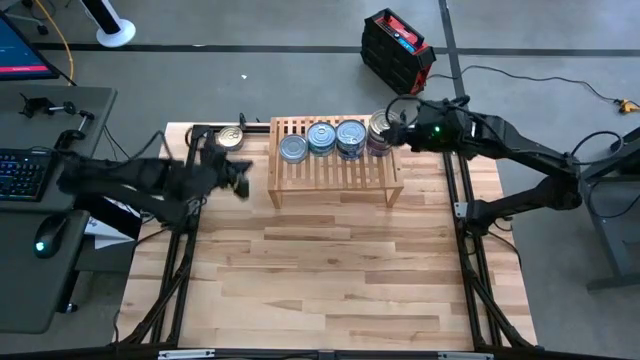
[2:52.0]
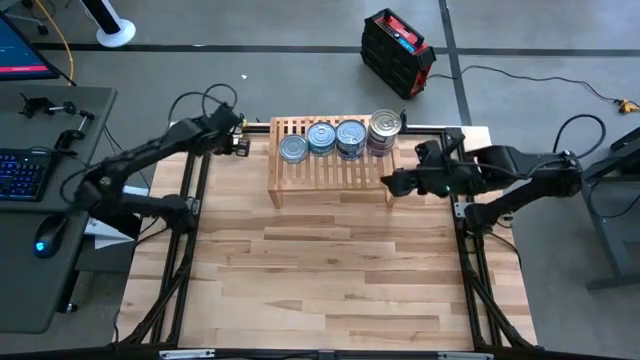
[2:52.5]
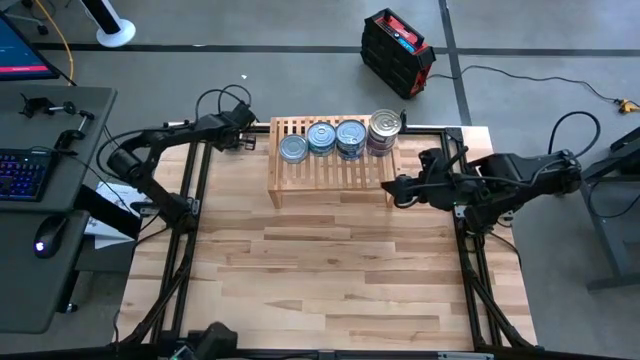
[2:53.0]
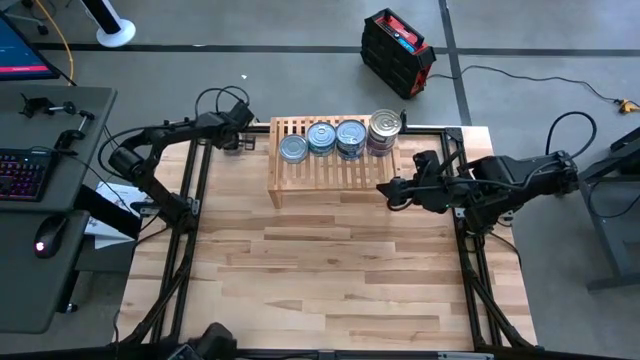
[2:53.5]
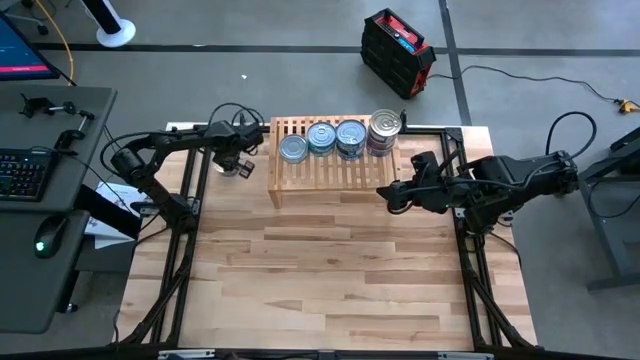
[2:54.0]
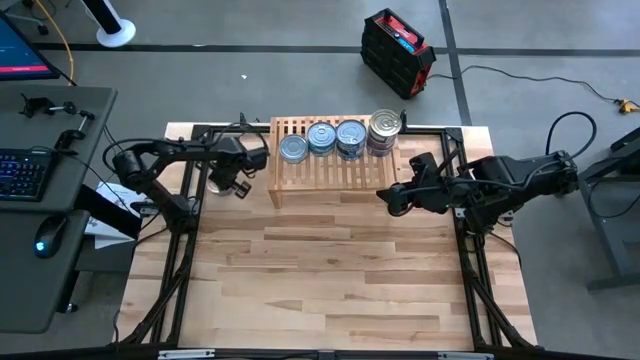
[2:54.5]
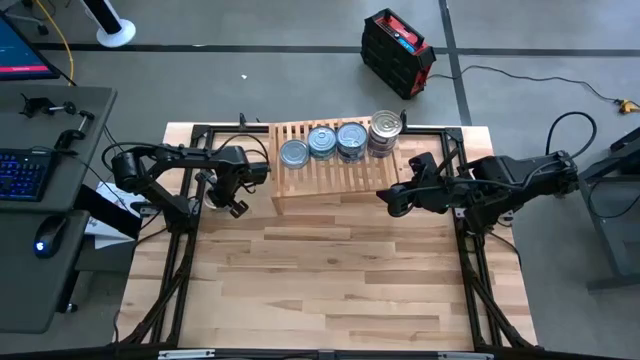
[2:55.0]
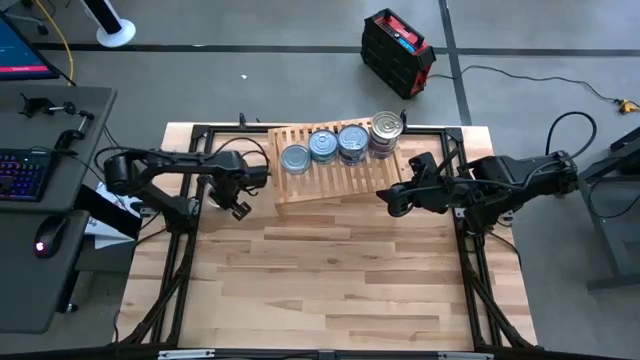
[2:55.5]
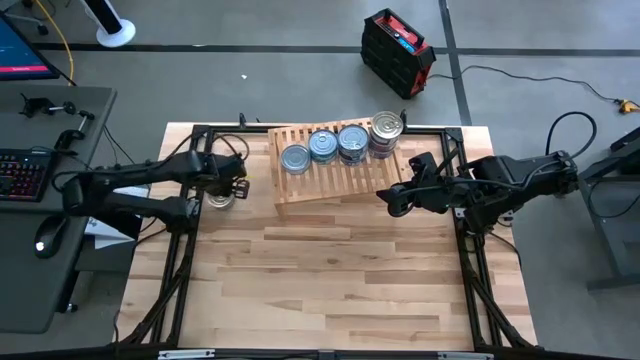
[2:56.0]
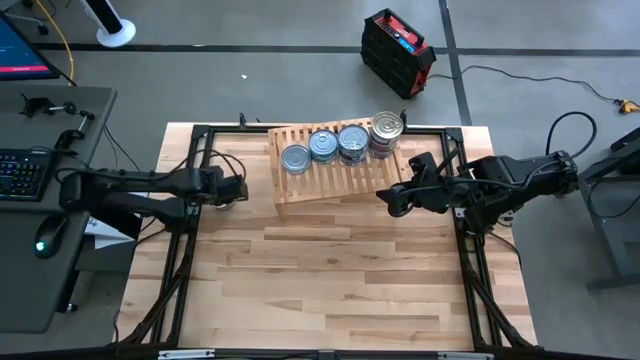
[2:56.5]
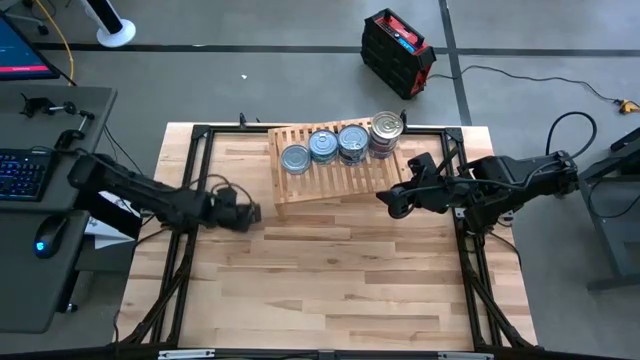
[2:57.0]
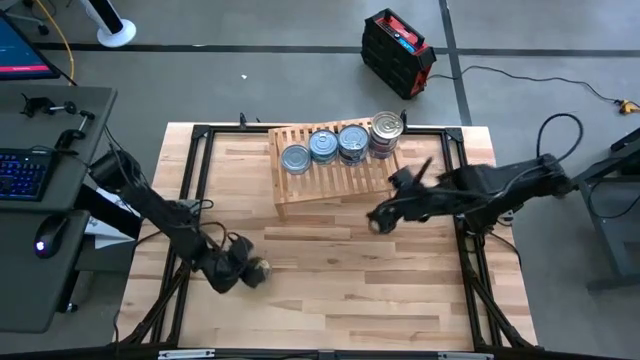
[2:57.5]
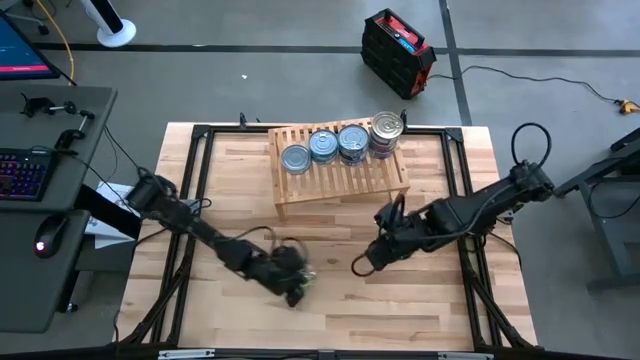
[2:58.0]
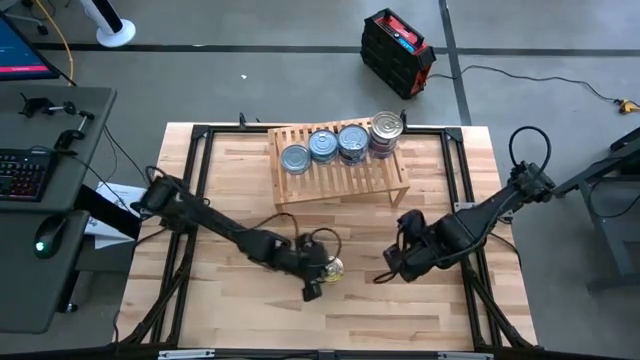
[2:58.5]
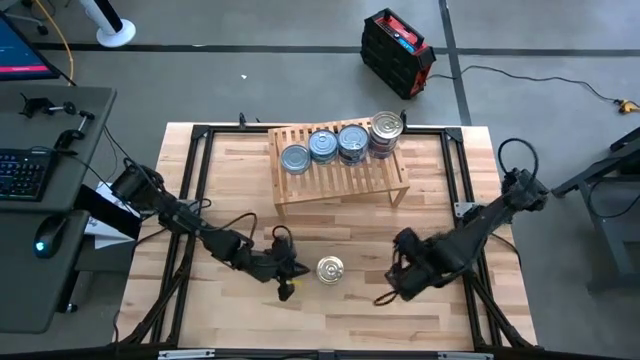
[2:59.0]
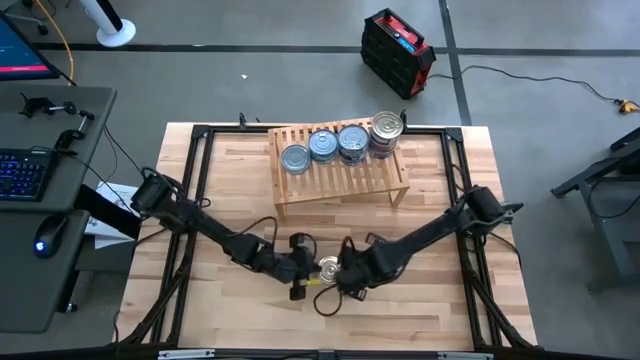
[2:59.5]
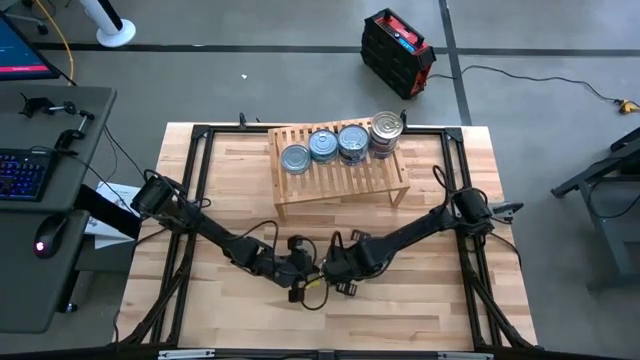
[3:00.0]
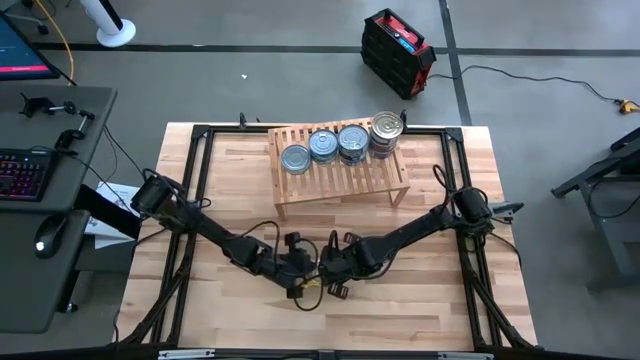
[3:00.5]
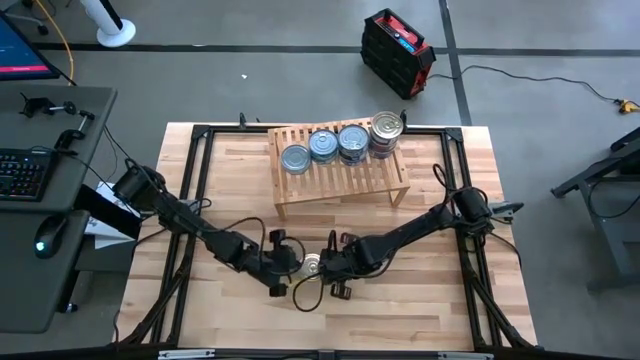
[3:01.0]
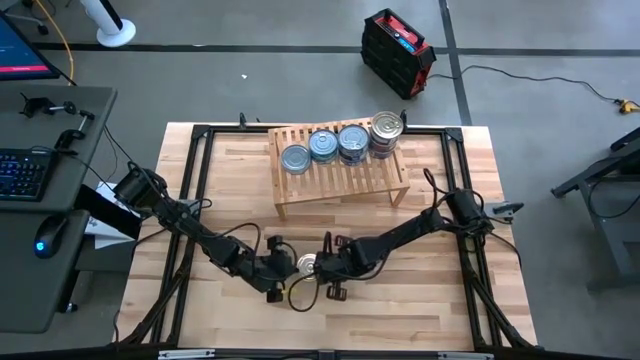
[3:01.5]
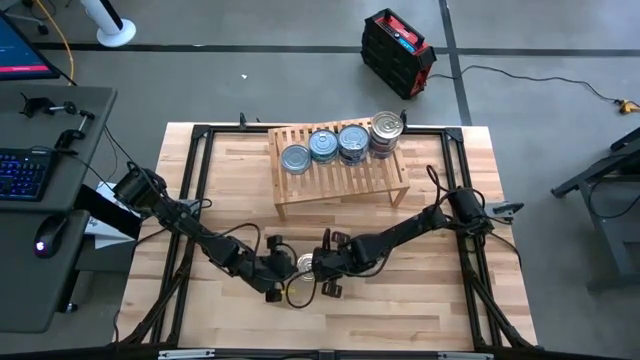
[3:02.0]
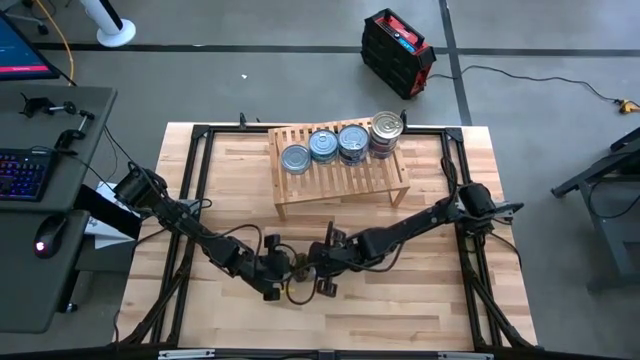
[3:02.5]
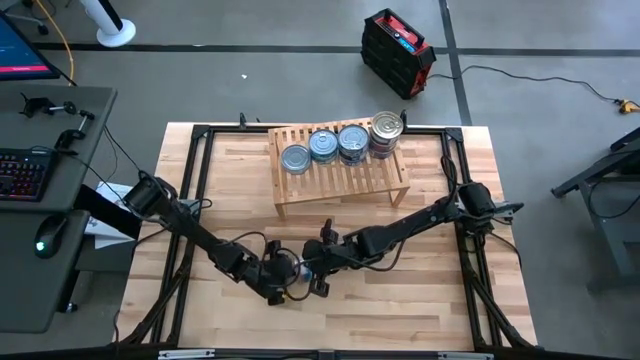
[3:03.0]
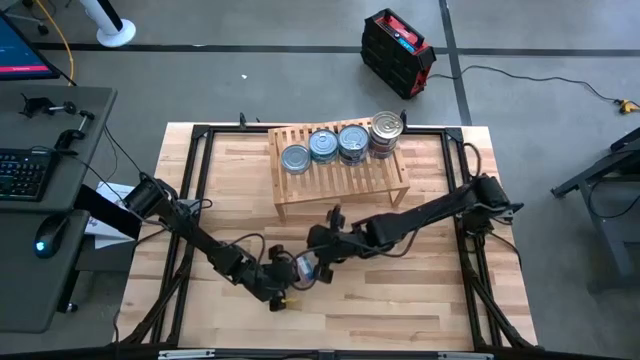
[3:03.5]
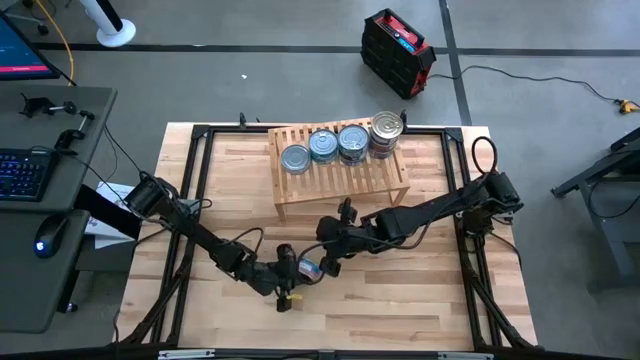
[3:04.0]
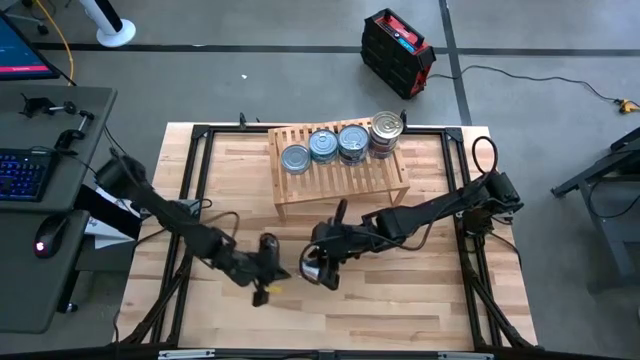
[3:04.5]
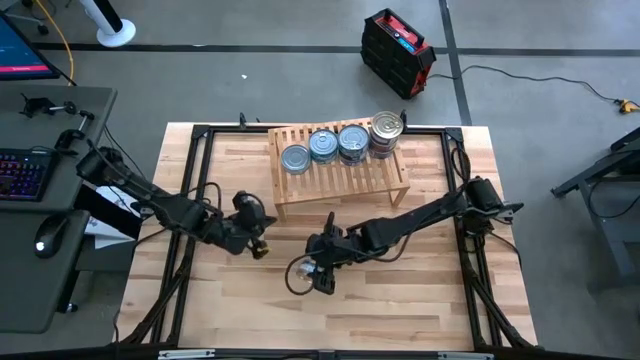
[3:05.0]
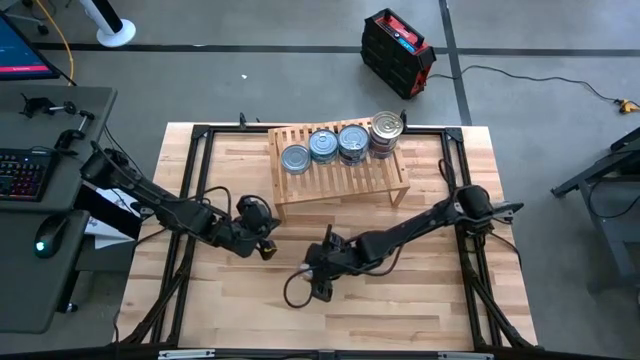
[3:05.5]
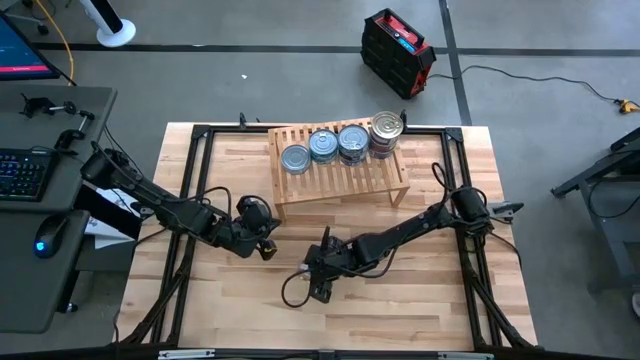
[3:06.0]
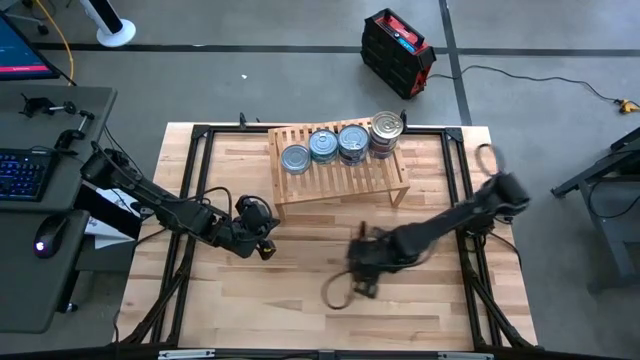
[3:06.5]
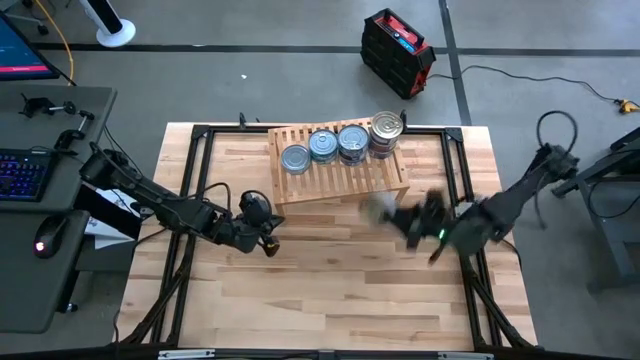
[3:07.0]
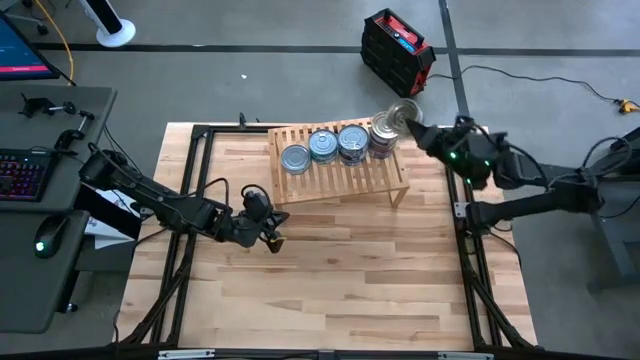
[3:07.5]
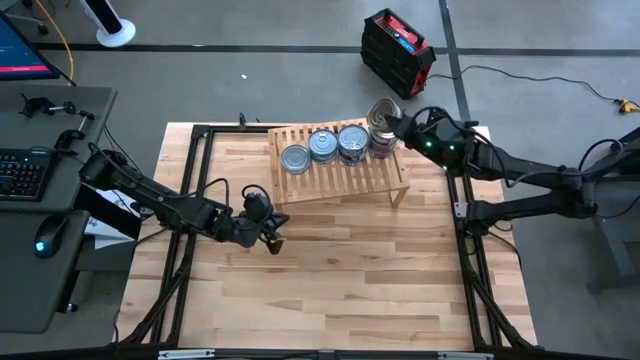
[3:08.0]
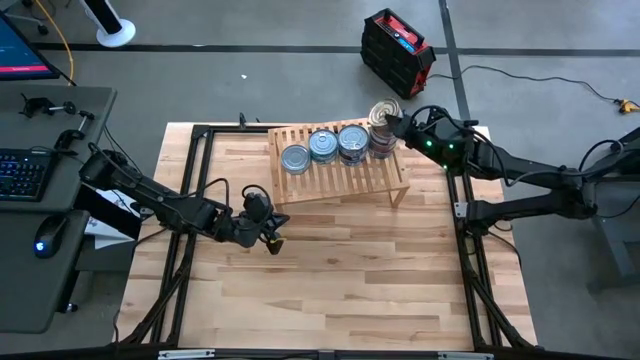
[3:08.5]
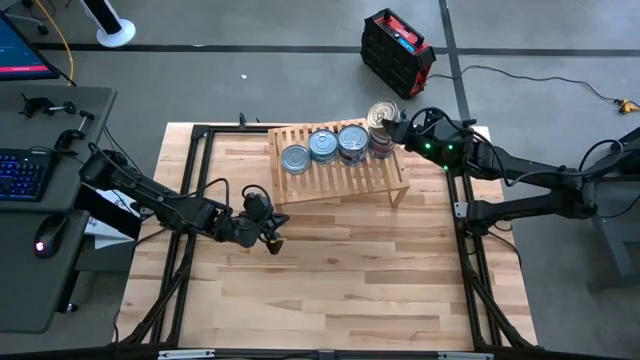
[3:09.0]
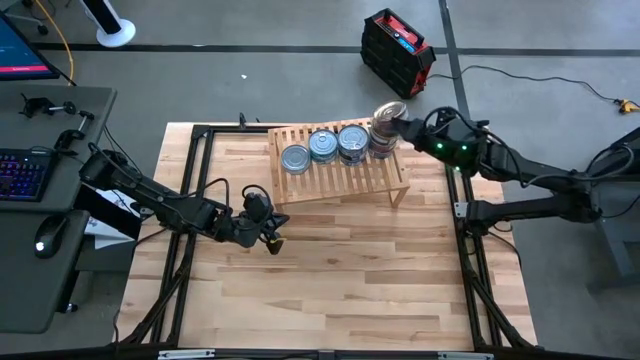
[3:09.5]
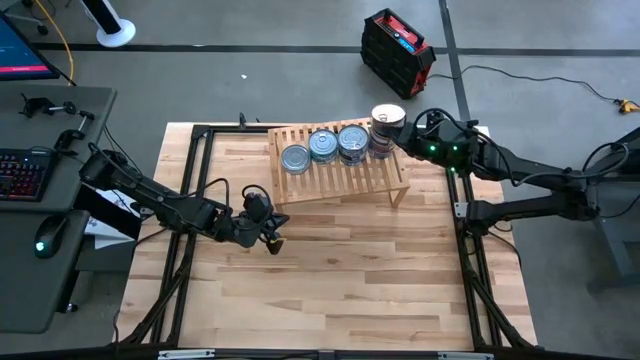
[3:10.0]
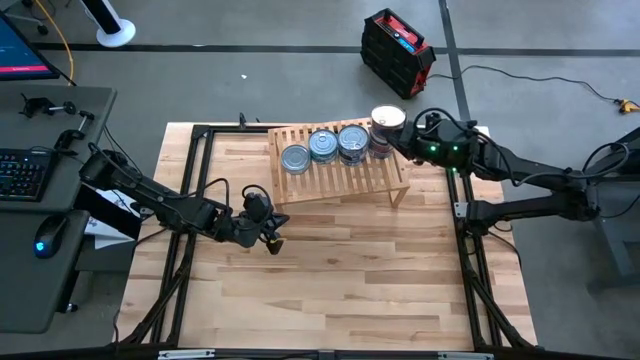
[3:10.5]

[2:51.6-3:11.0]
Task: Stack canned seafood by type on shelf
Stack the pink tuna can on the stacked pink tuna cans on the shelf

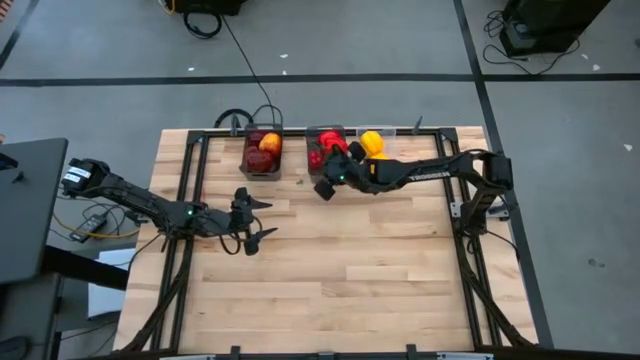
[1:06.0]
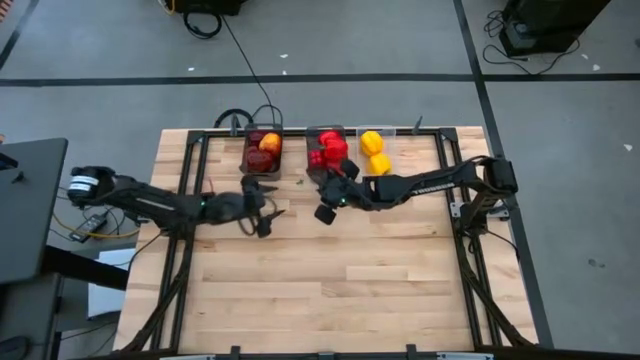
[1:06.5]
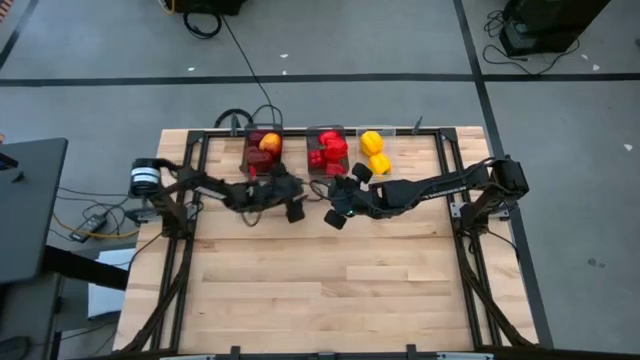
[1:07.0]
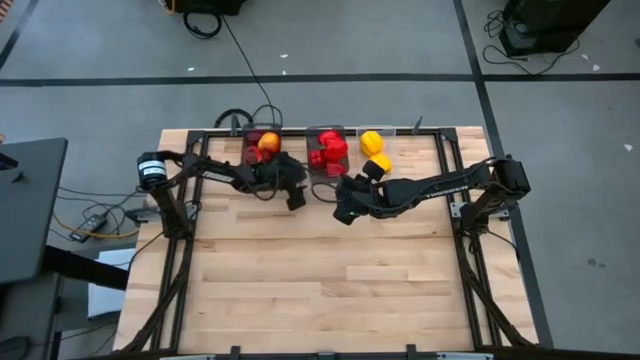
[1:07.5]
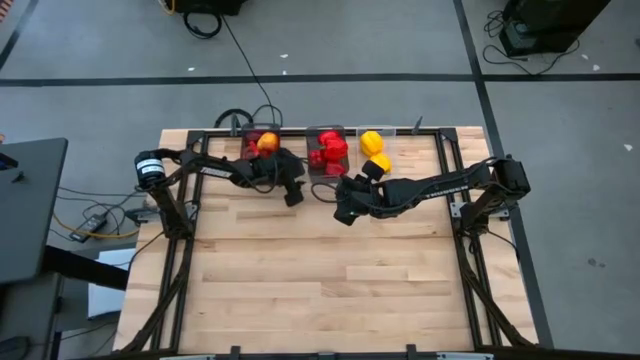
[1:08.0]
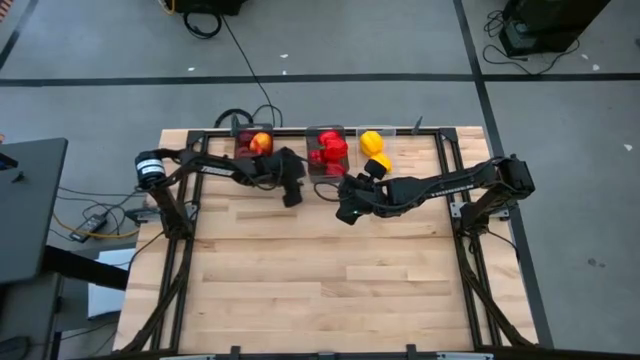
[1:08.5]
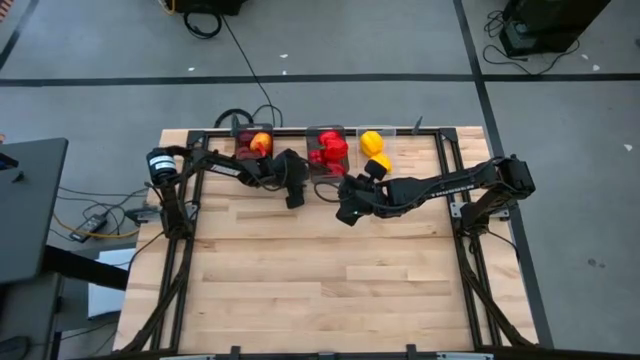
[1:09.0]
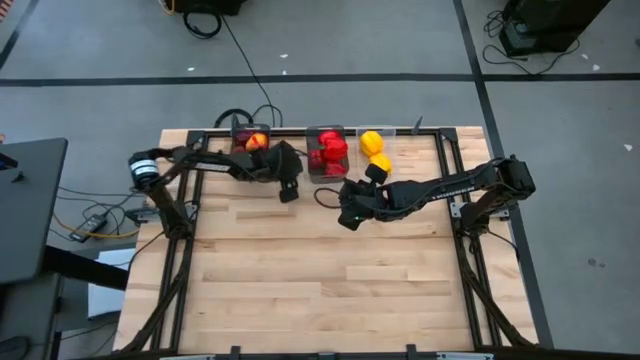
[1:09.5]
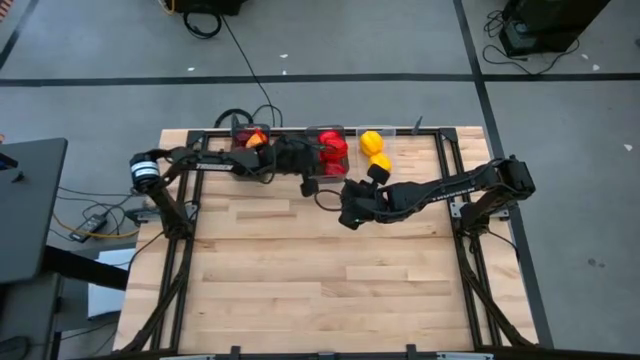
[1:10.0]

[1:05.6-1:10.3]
Task: Sort produce into baskets
Put the green leaf of the red bell pepper into the right black bin
